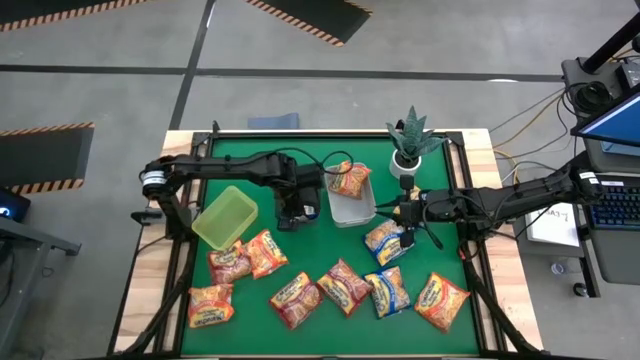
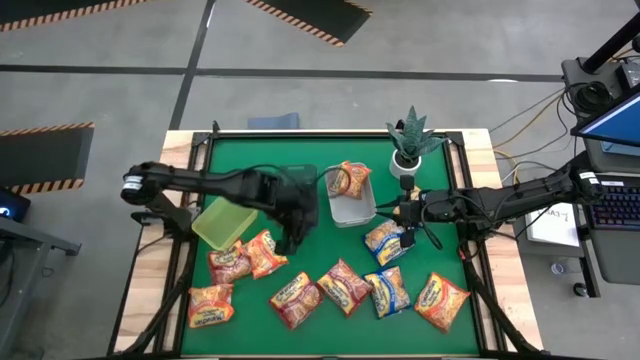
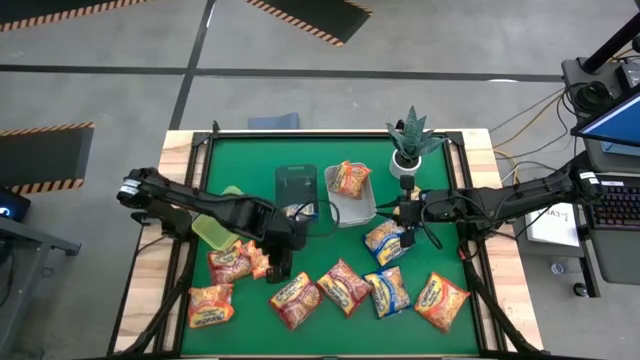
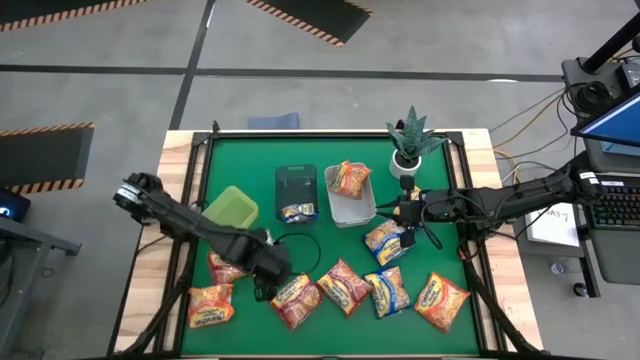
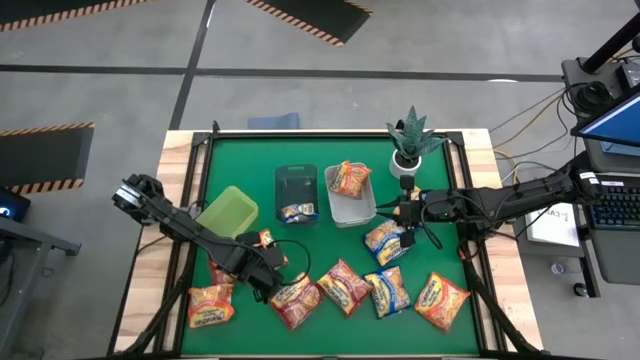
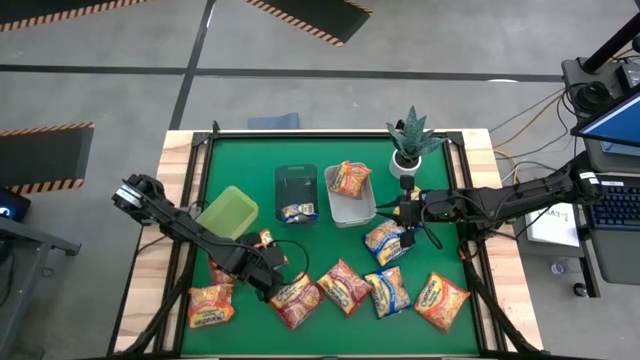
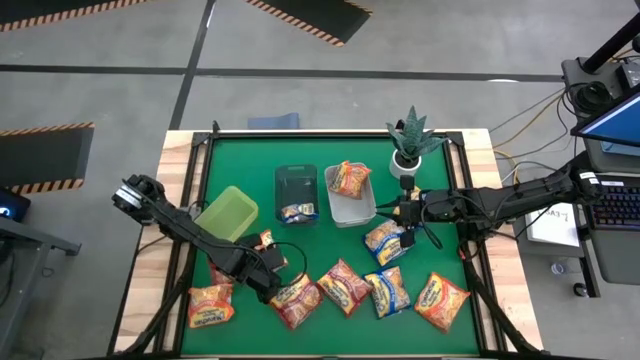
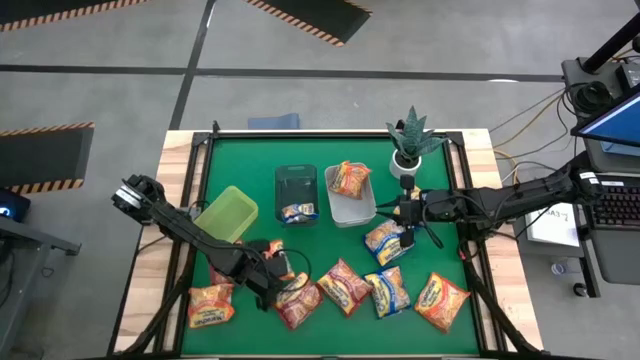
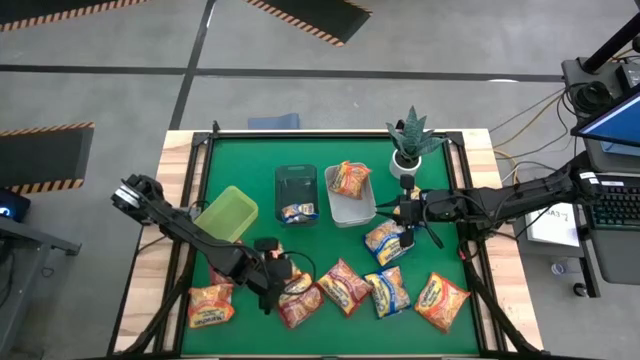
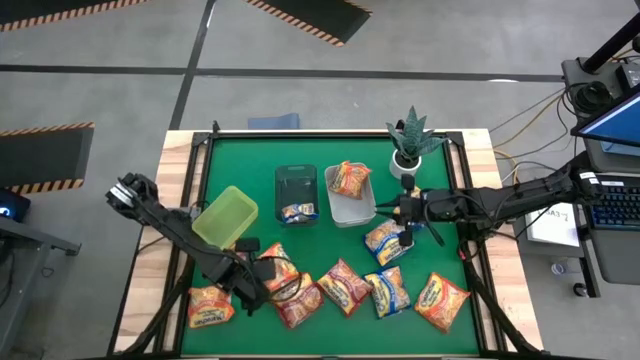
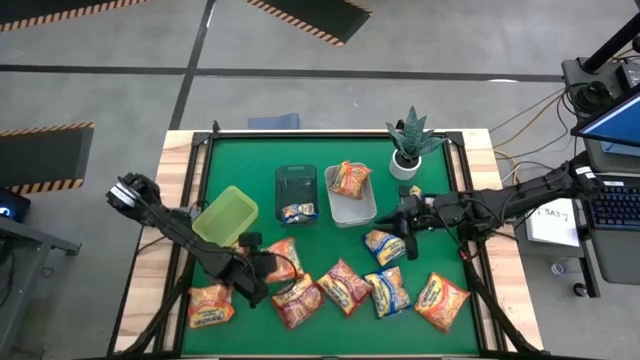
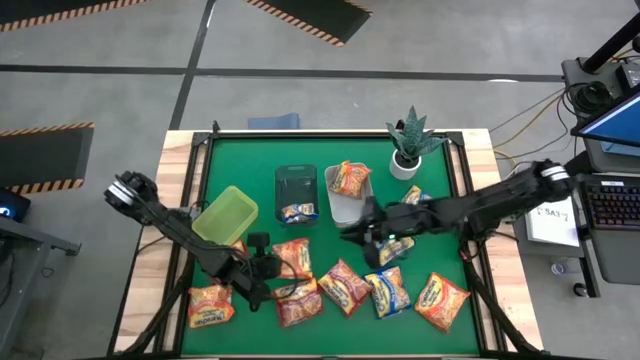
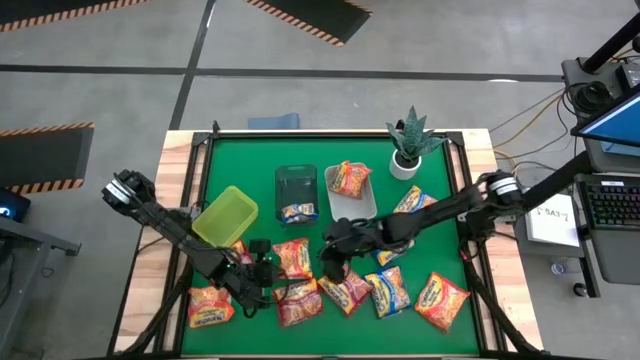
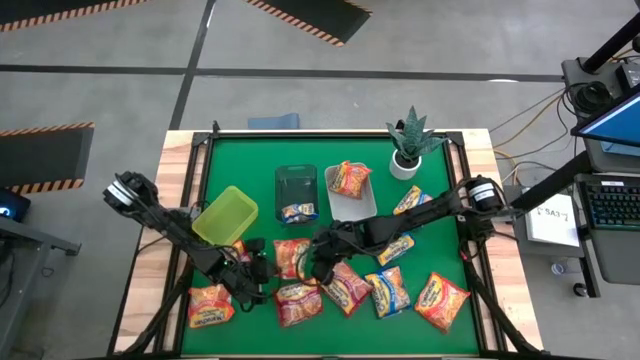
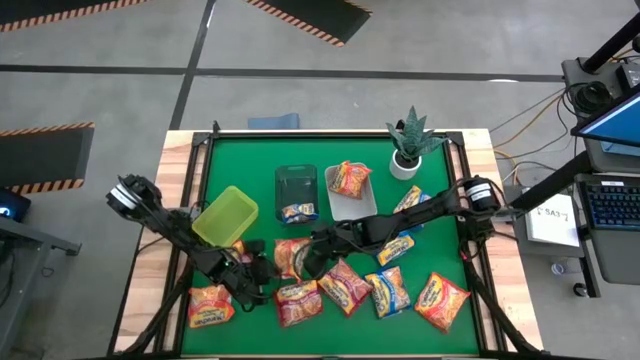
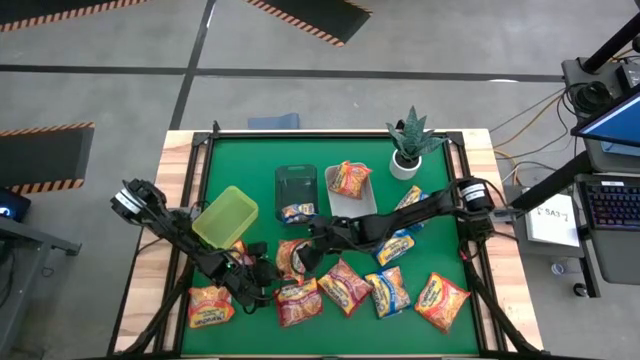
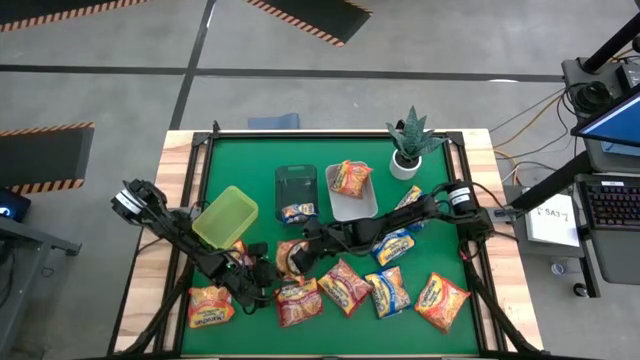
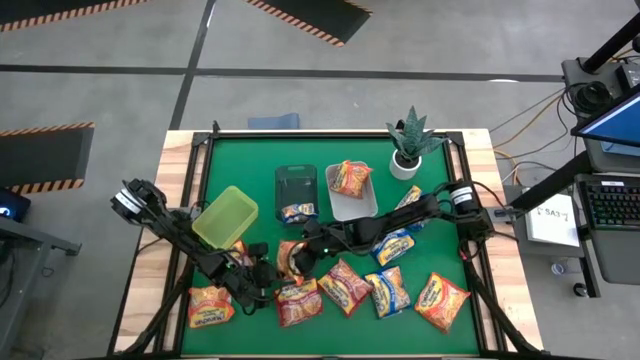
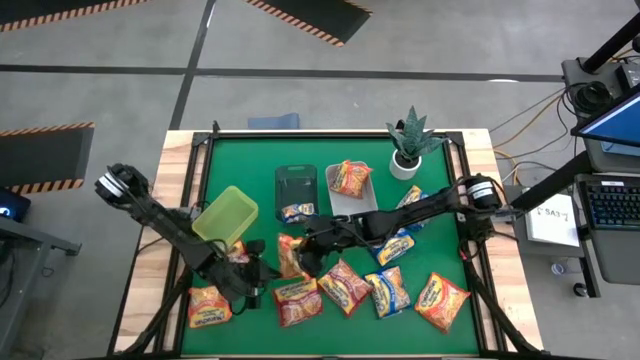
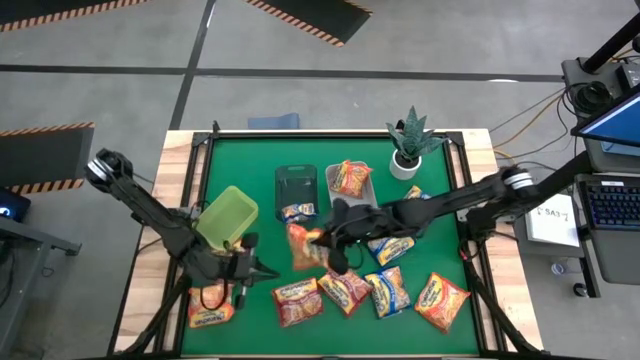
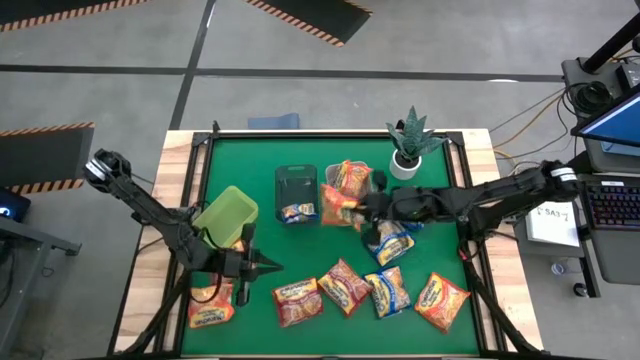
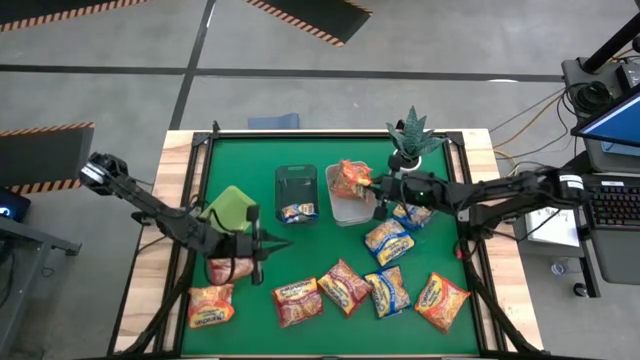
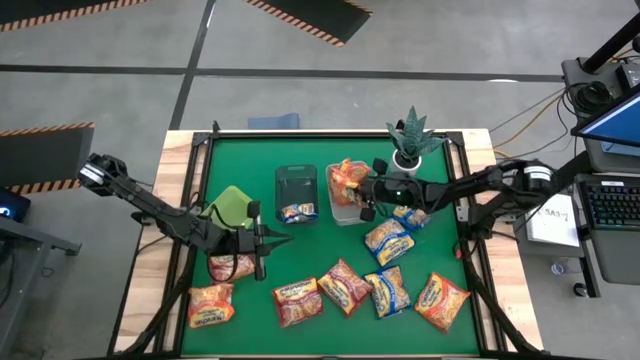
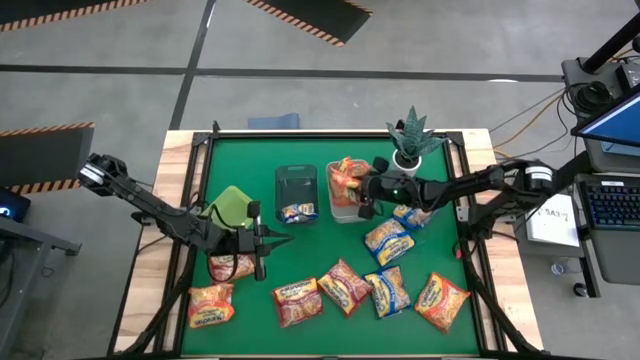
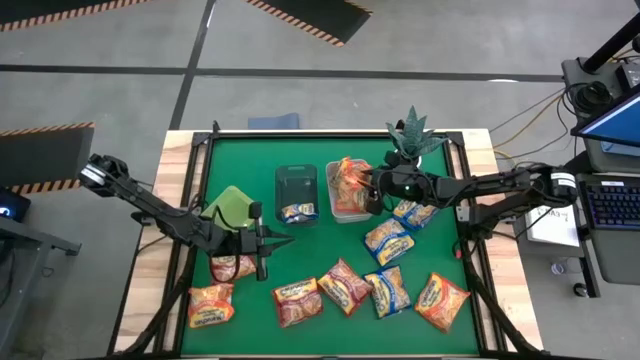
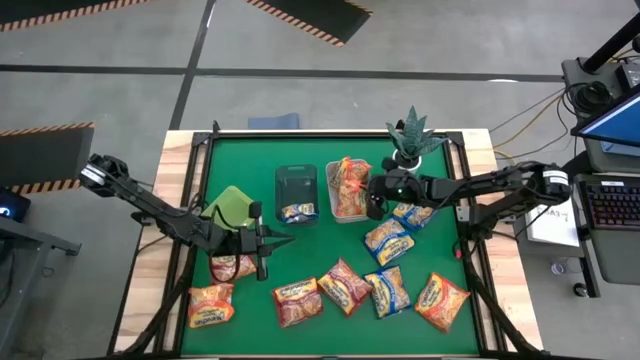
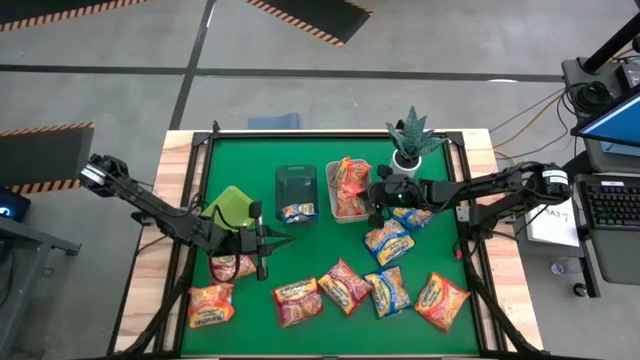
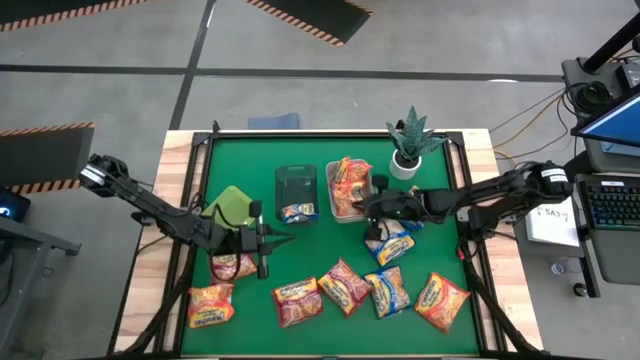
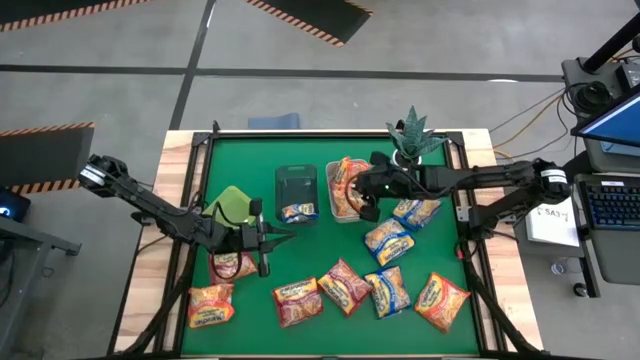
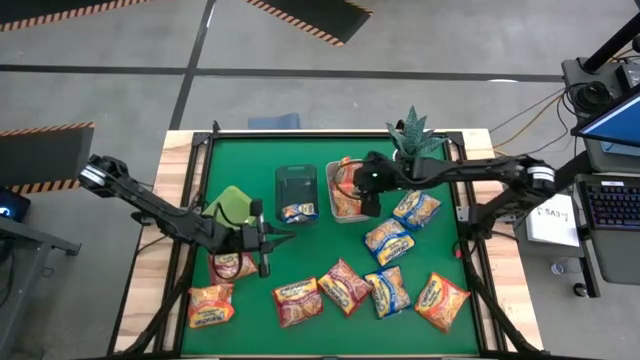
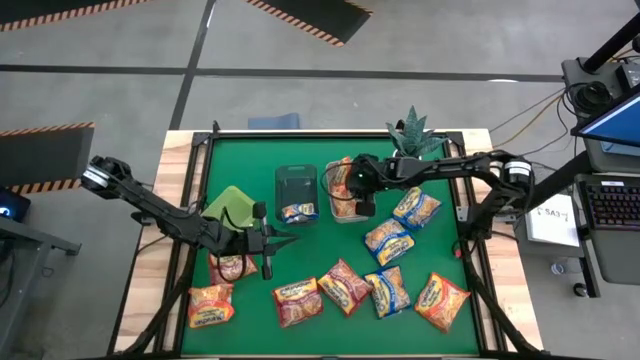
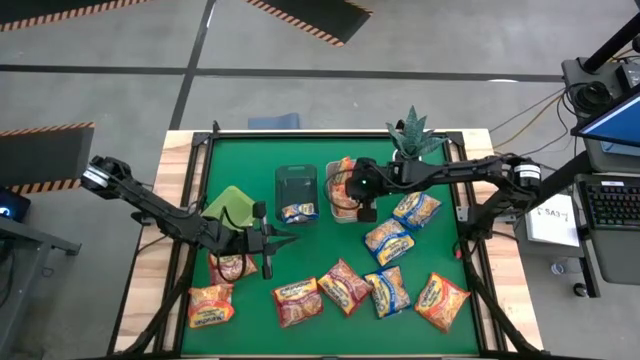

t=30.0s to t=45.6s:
Task: Sort Maruchan noodles
Put the orange noodle pack into the gray bin

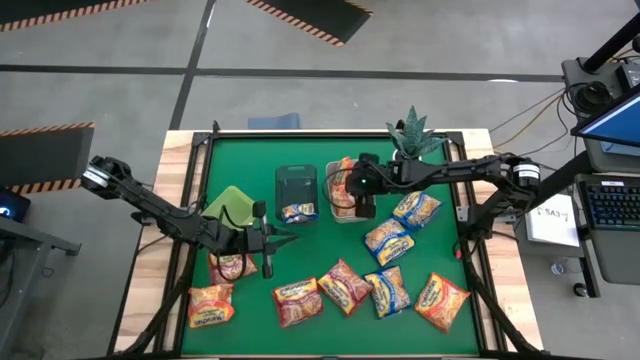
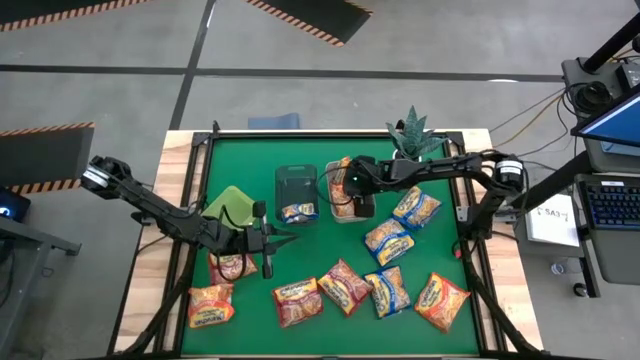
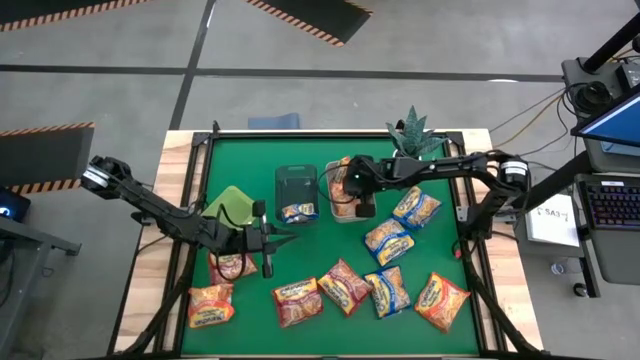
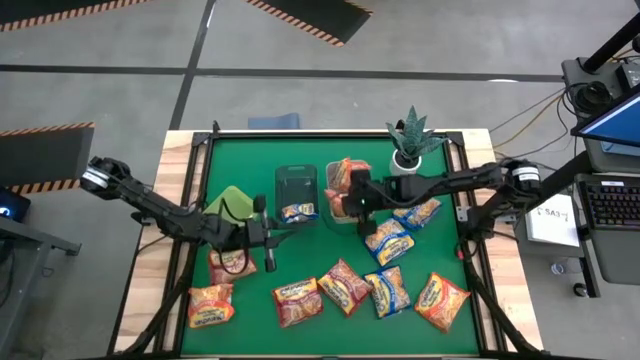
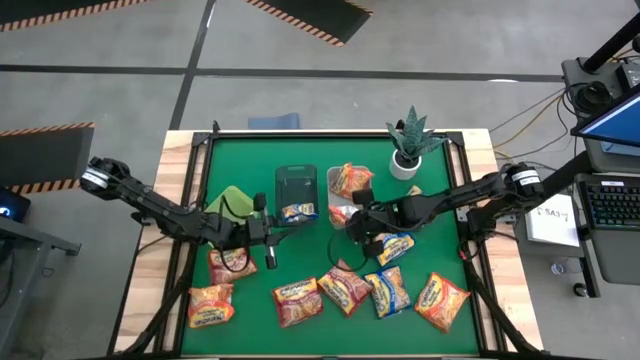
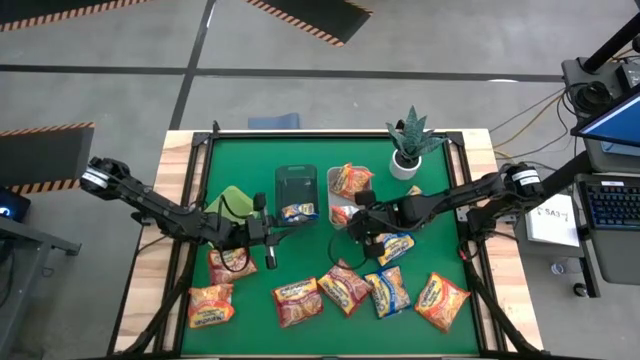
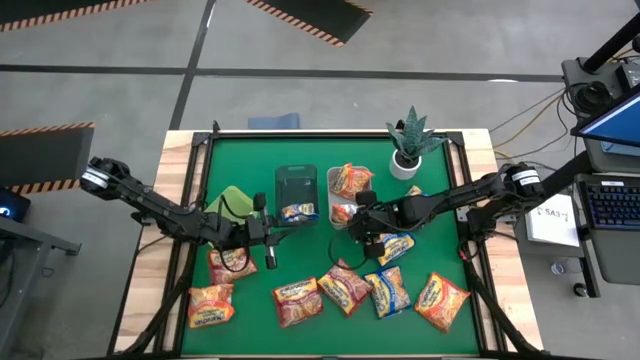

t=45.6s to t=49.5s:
Put the orange noodle pack into the gray bin
